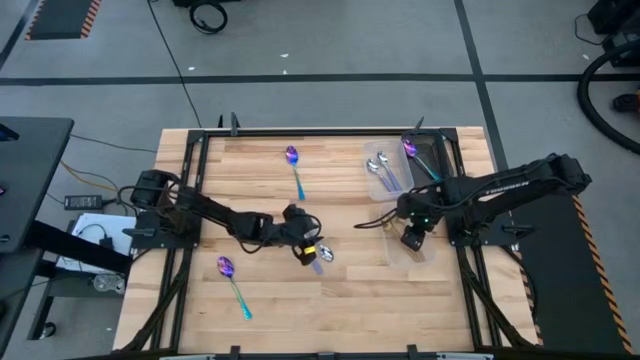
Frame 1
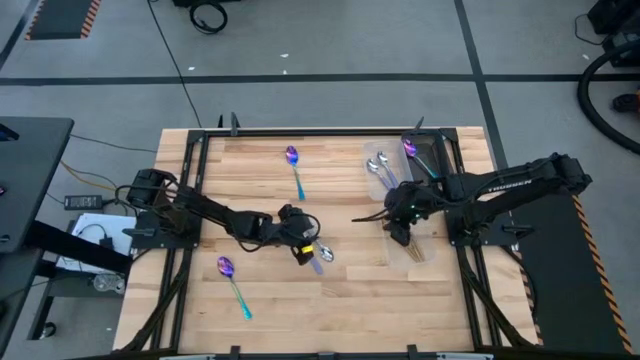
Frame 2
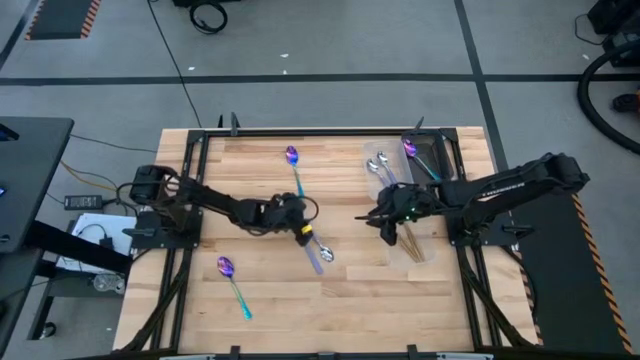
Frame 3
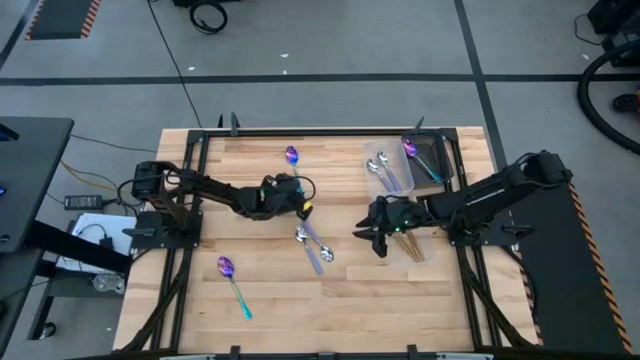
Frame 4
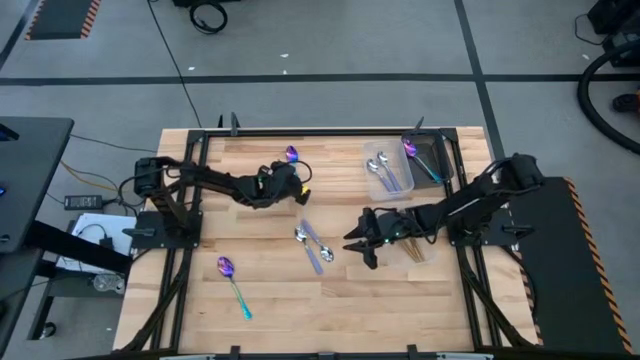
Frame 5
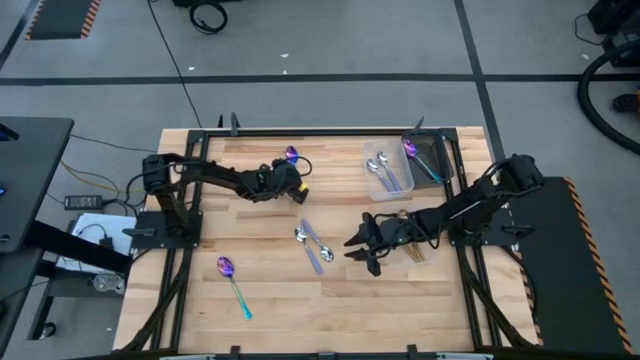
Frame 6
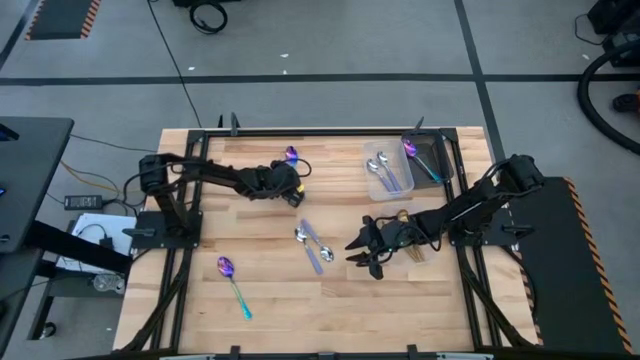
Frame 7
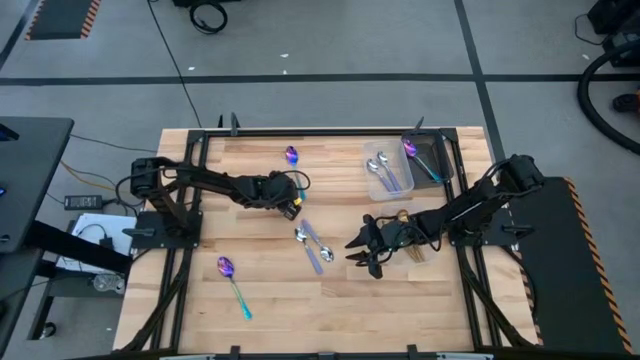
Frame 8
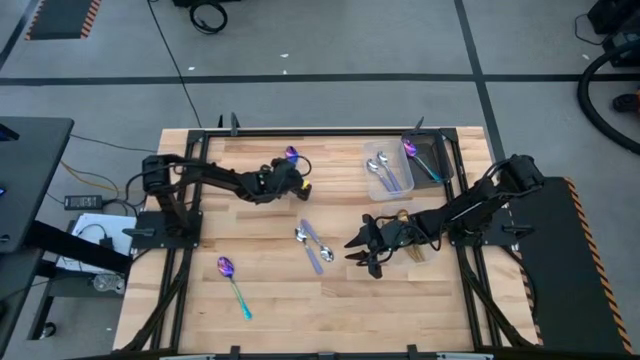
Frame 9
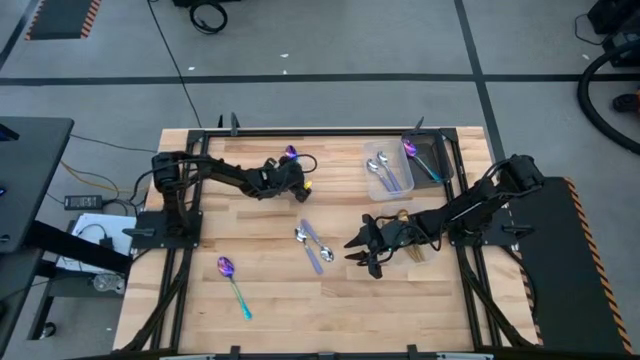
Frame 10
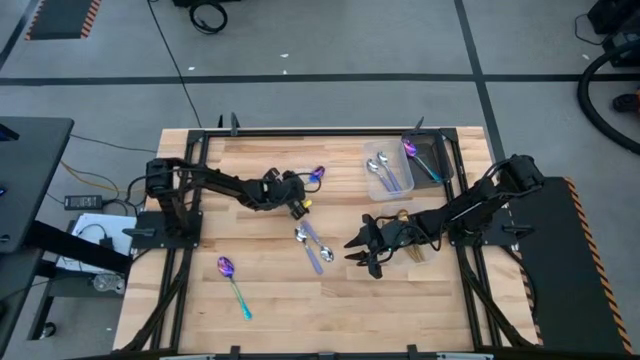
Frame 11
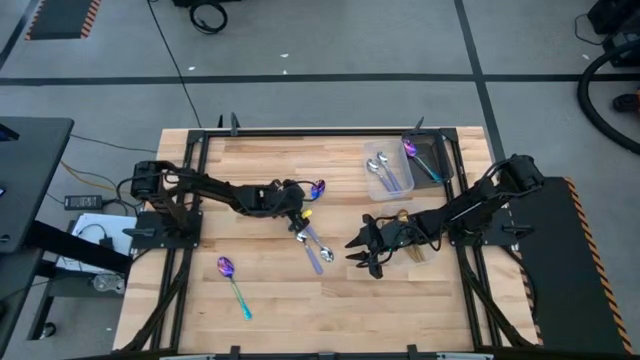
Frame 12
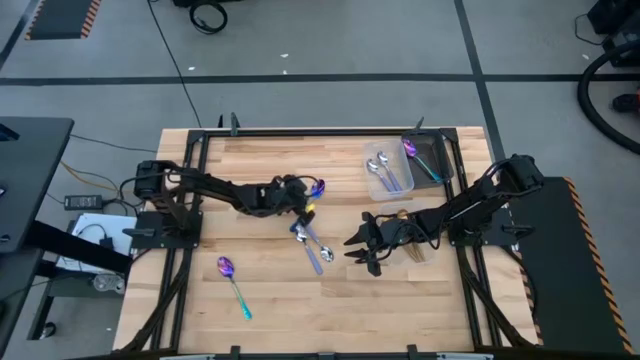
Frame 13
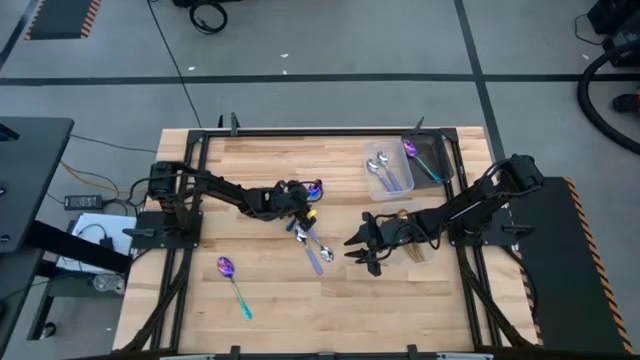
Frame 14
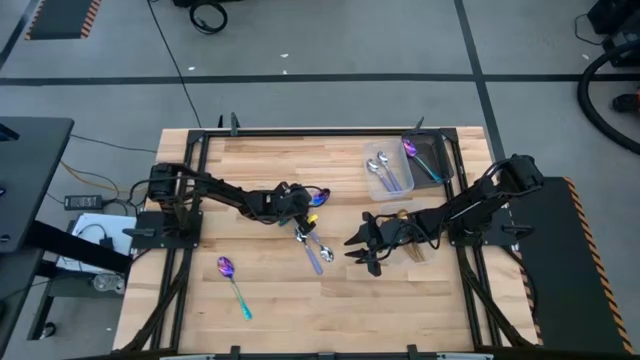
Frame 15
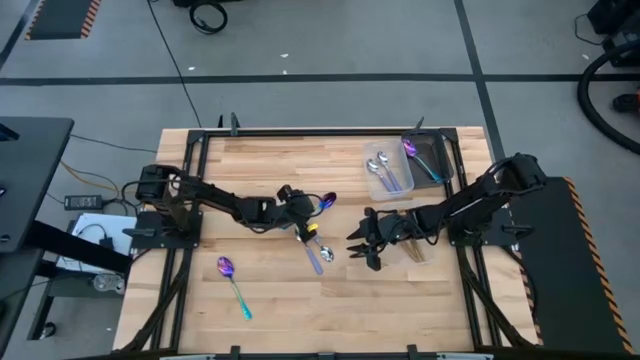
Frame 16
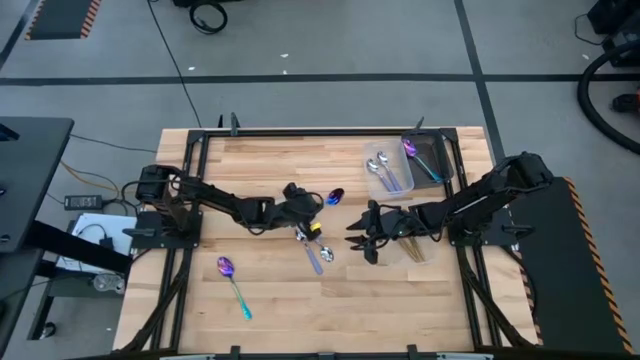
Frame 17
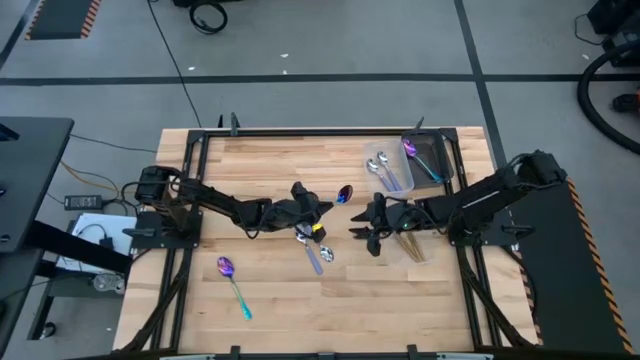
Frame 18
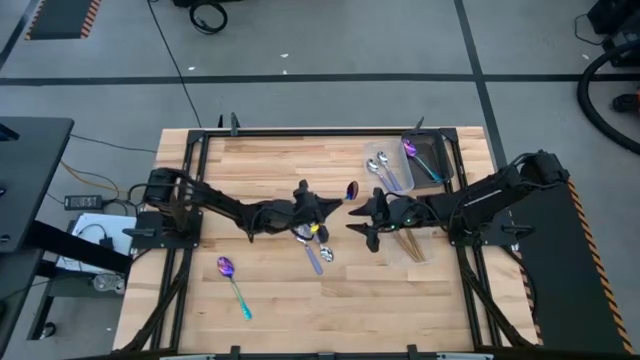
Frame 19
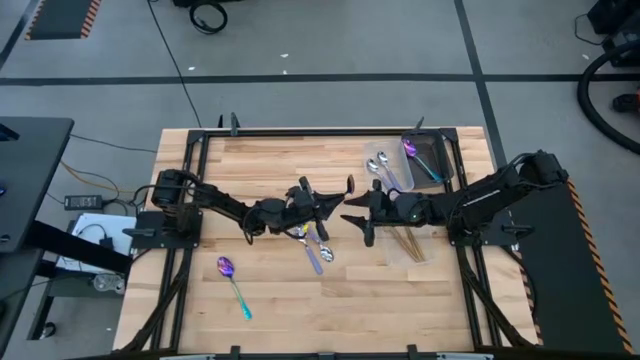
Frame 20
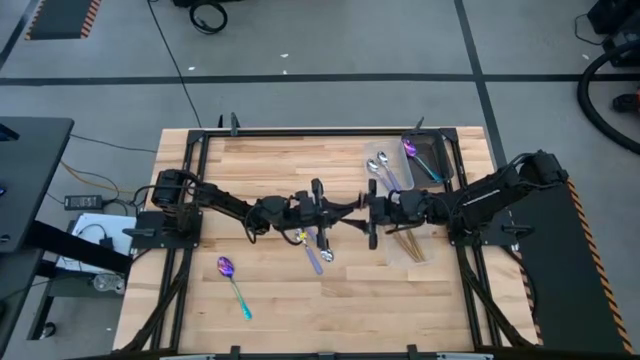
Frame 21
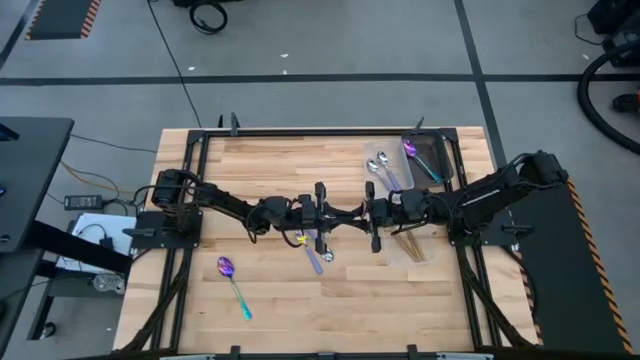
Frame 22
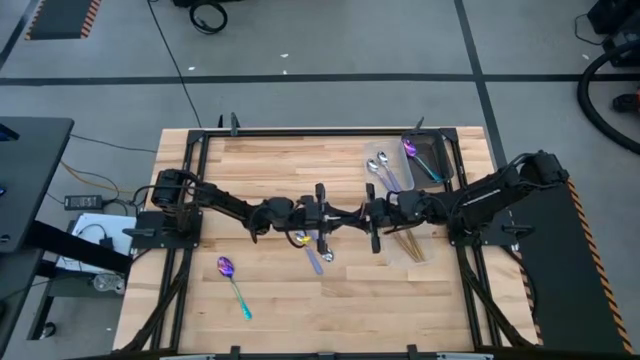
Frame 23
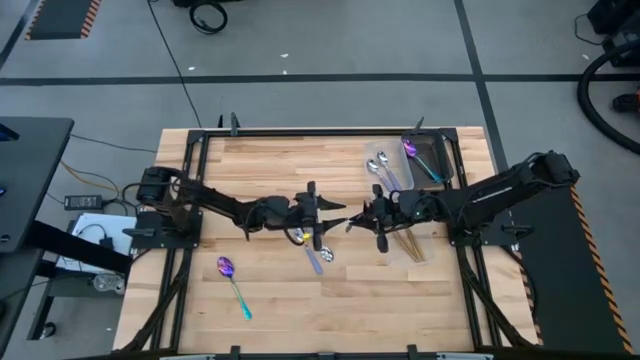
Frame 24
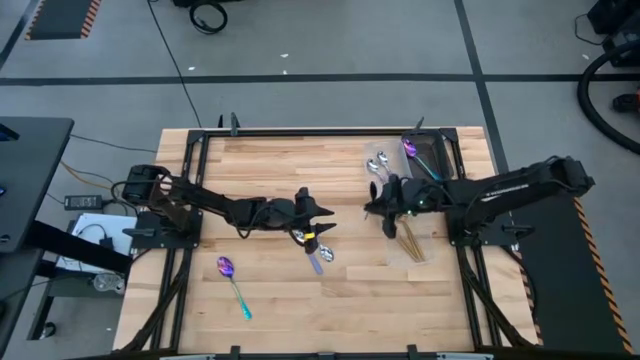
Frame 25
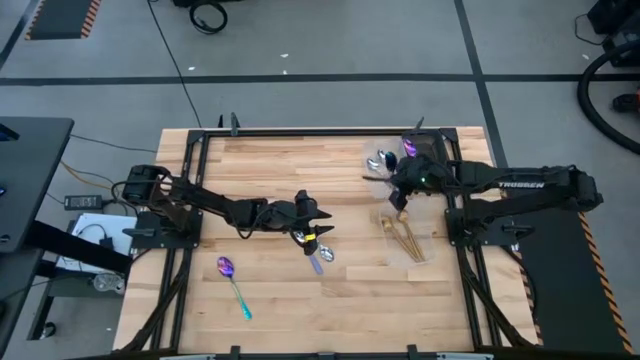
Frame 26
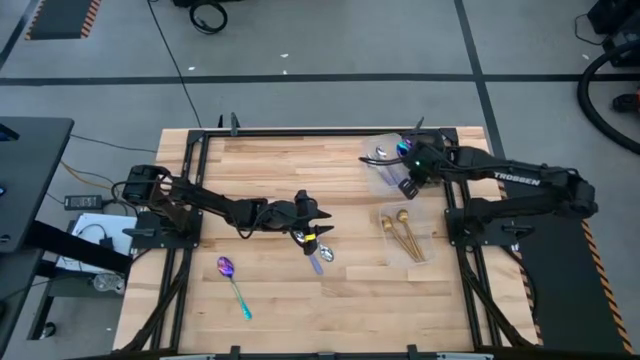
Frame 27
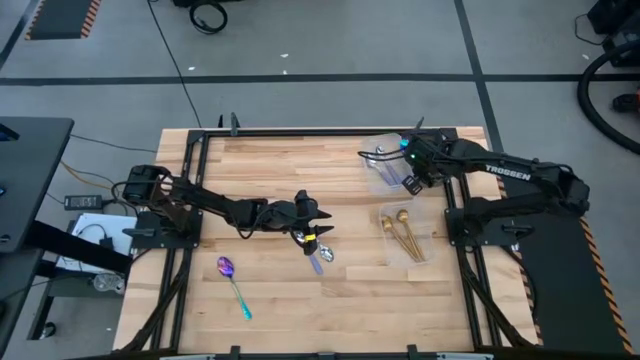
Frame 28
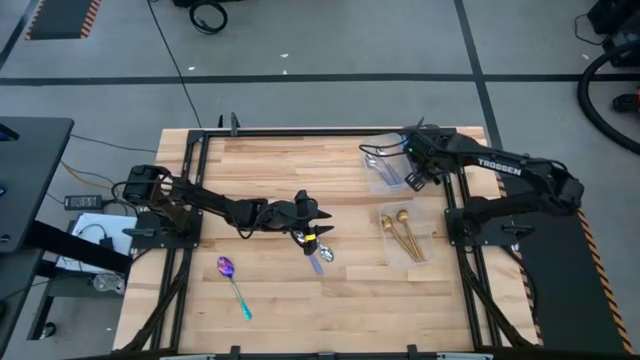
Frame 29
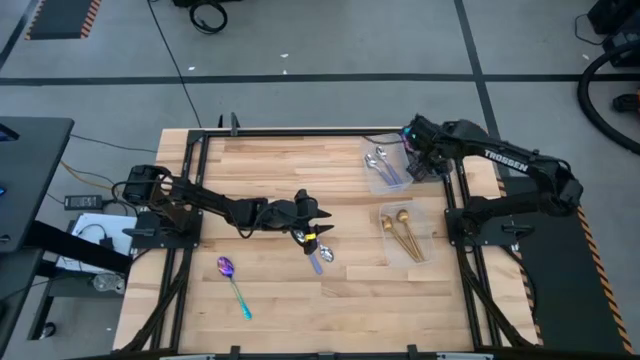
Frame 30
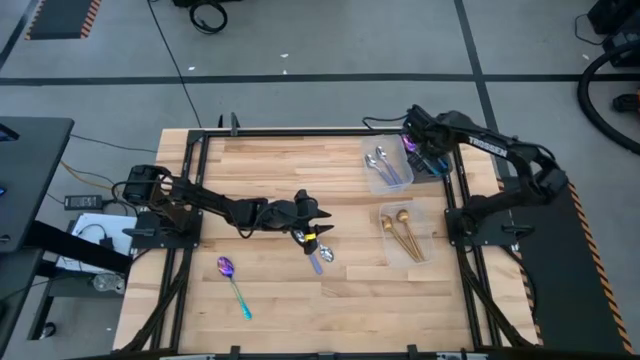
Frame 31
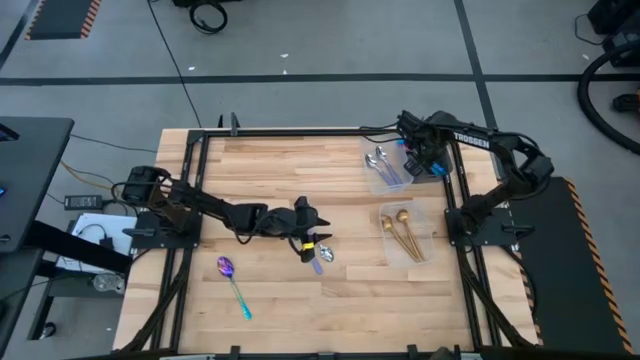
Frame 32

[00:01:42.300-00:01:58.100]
Task: Sort silverware by color (type)
Put the blue spoon into the black bin

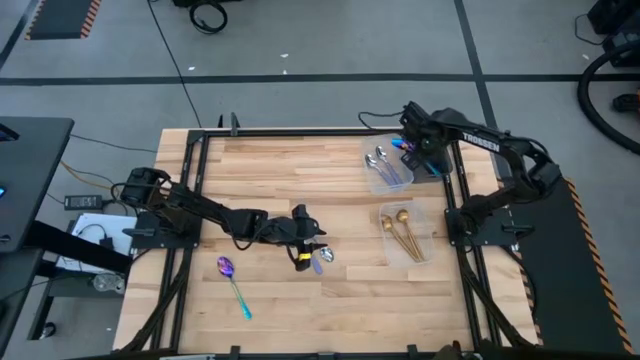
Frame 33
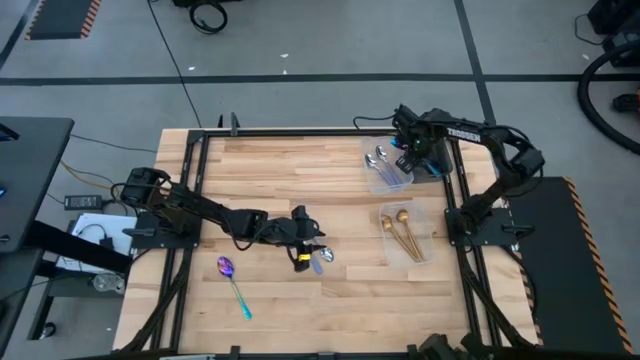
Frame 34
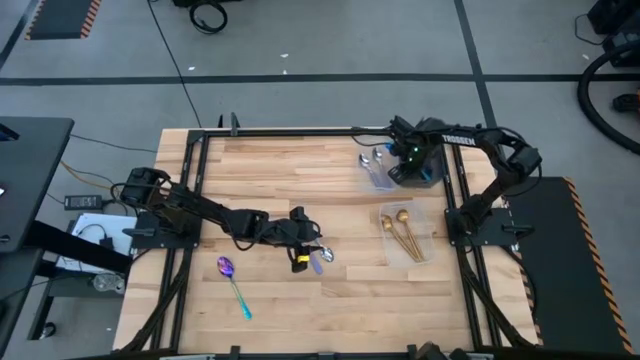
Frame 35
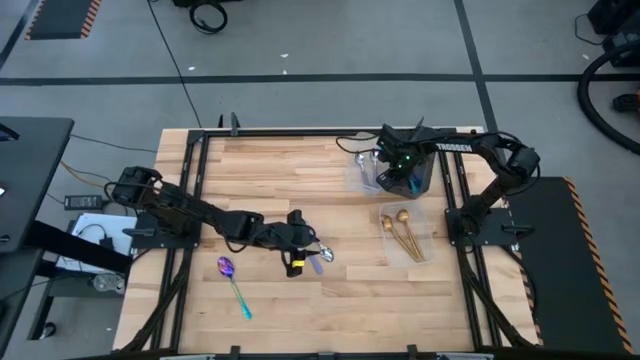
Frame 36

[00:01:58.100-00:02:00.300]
Adjust the black bin

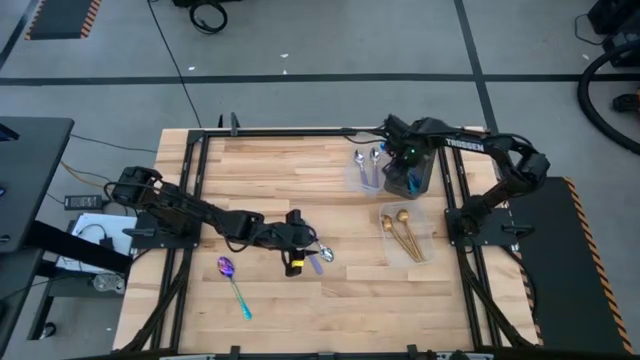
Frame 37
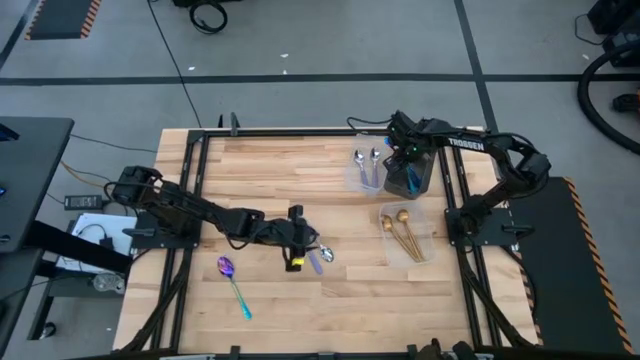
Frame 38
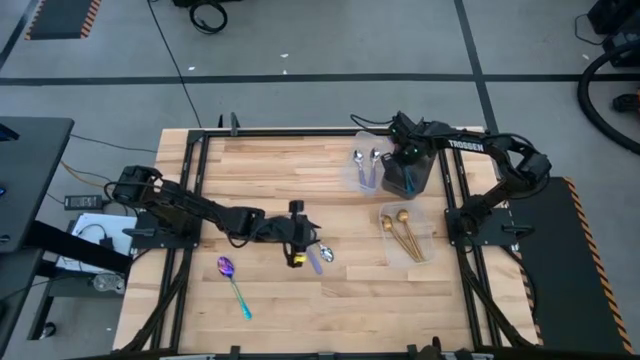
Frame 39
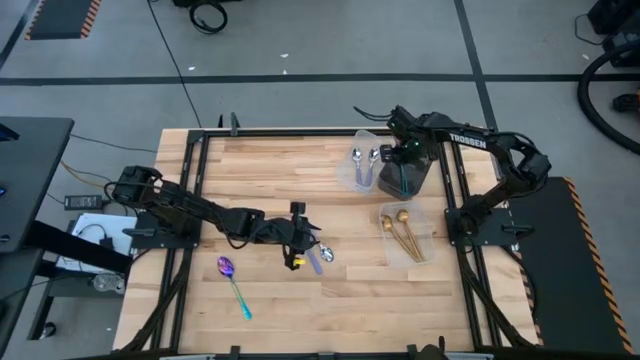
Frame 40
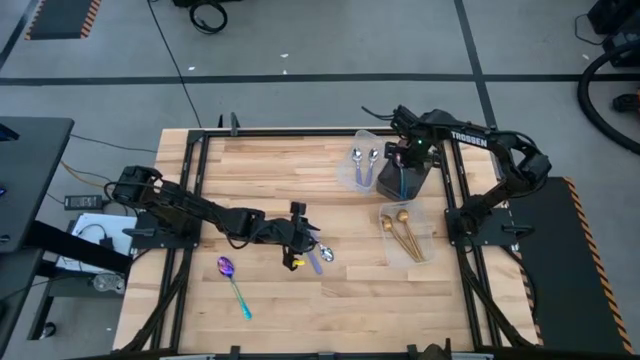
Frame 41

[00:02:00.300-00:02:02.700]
Put the blue spoon into the black bin

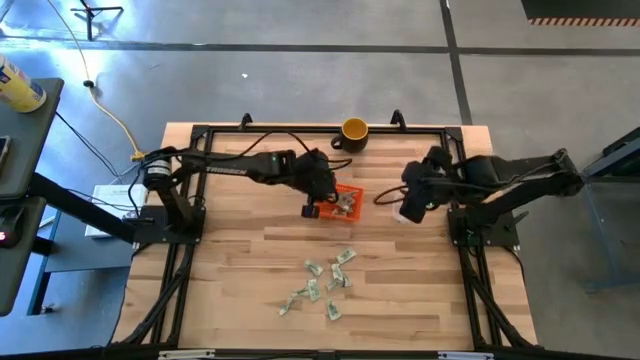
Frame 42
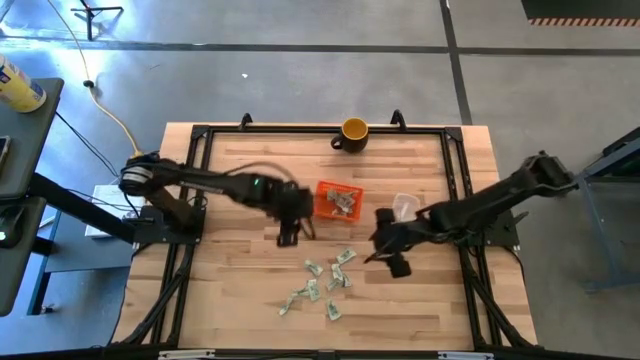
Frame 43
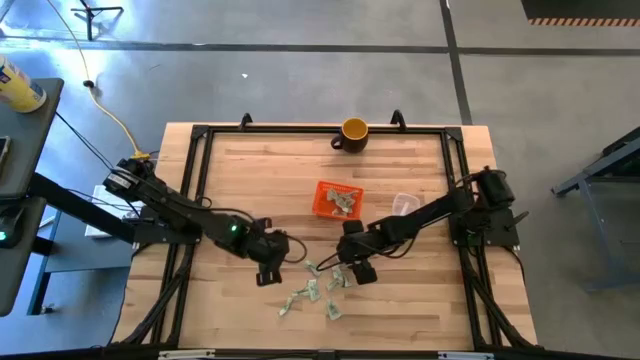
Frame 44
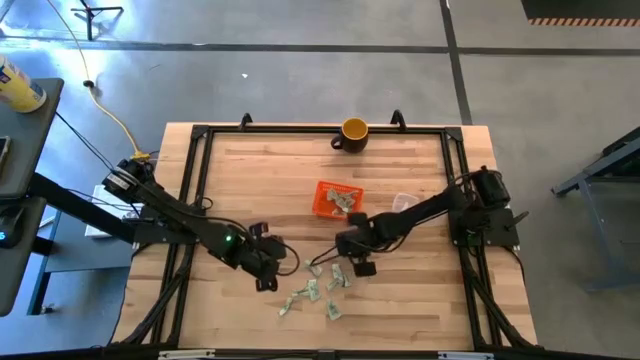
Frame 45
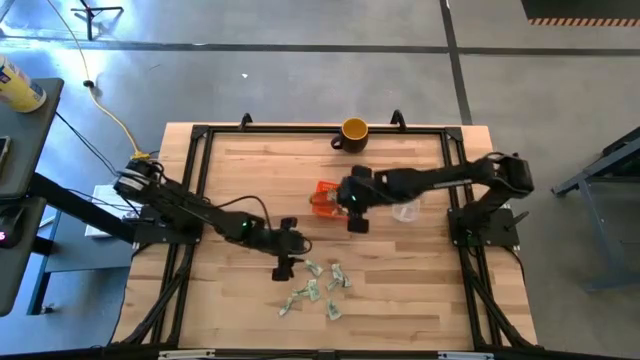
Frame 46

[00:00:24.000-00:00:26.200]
Task: Pick and place items into bin
Put the white stevia packet into the orange bin

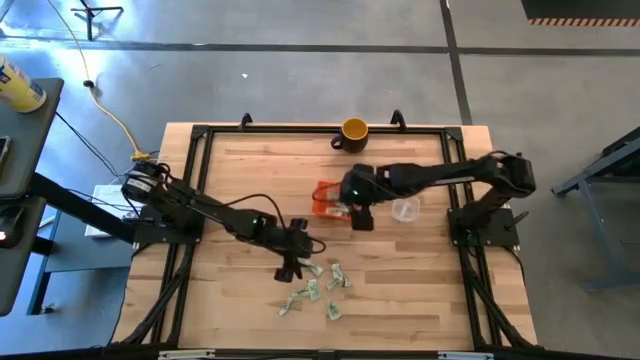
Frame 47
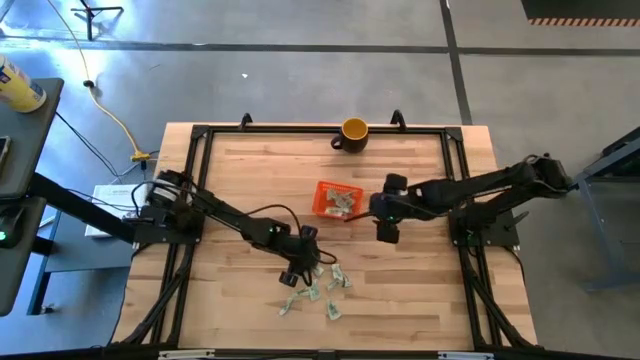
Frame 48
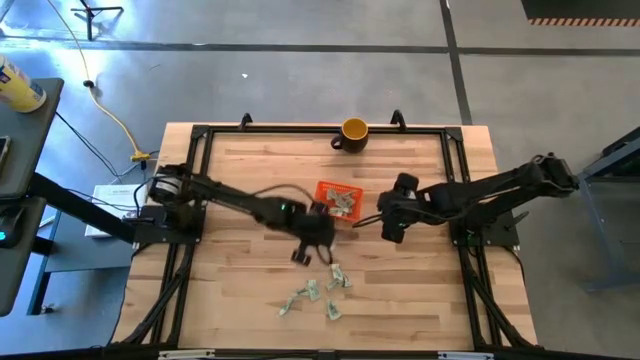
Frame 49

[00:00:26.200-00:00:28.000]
Put the white stevia packet into the orange bin
